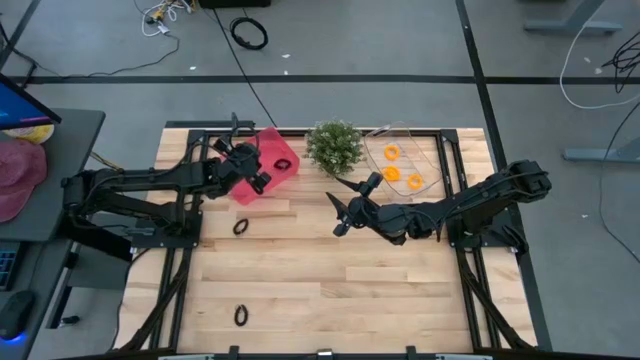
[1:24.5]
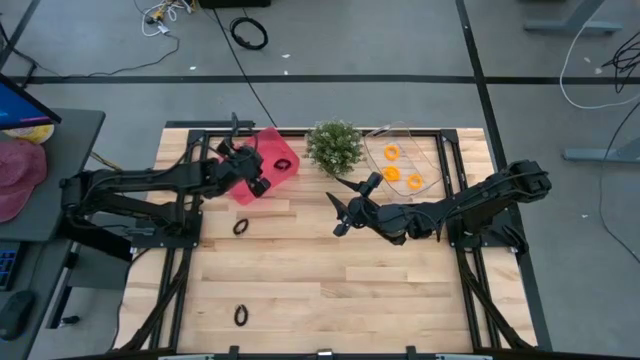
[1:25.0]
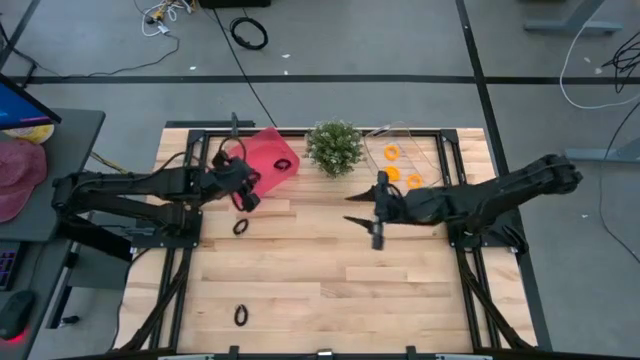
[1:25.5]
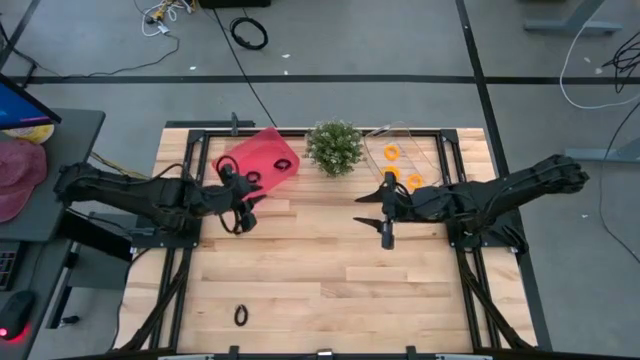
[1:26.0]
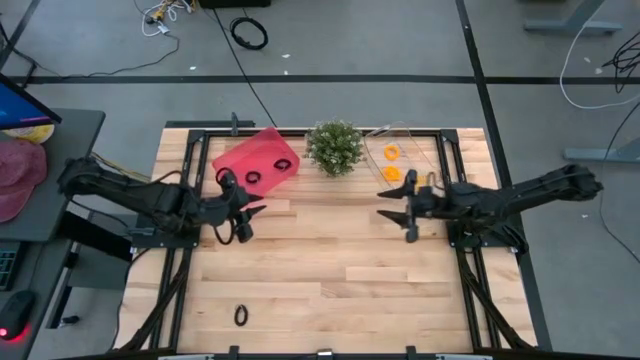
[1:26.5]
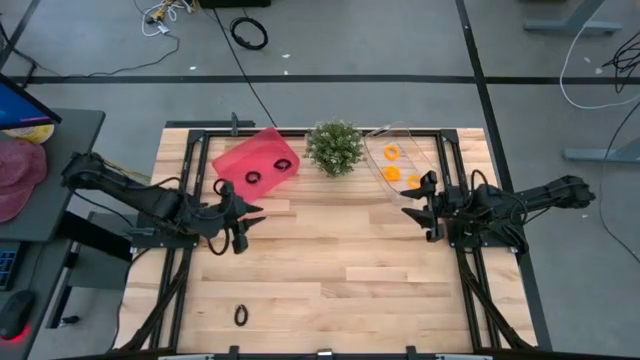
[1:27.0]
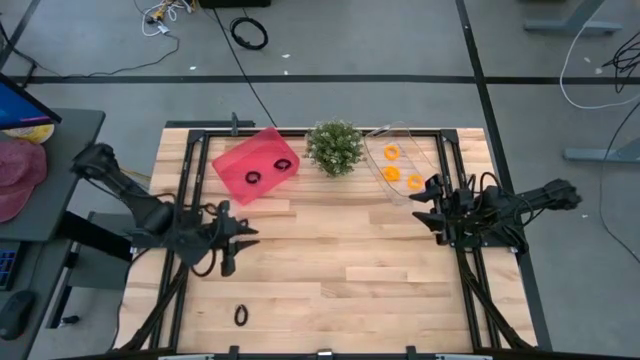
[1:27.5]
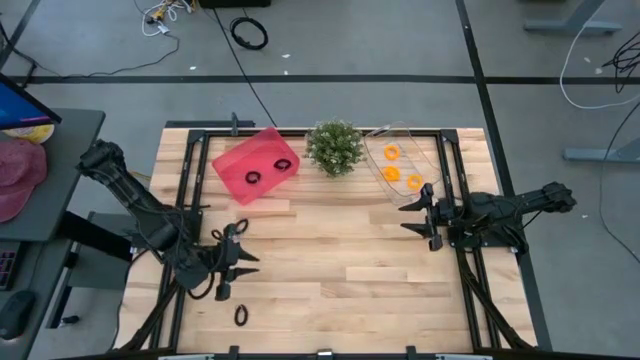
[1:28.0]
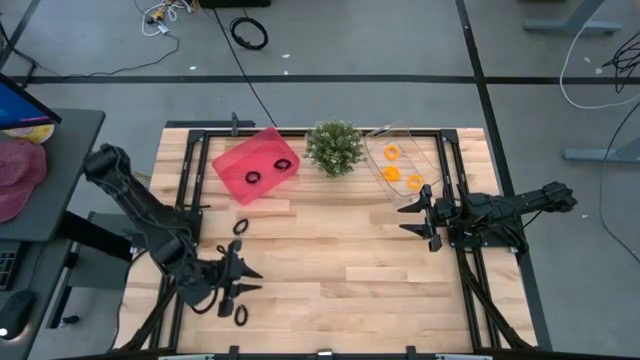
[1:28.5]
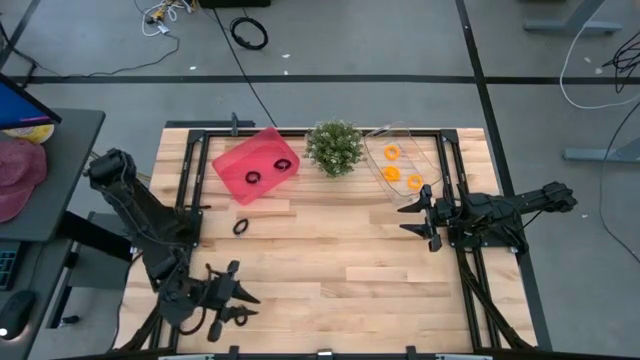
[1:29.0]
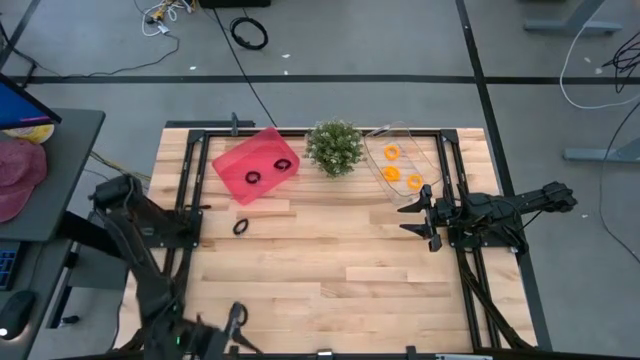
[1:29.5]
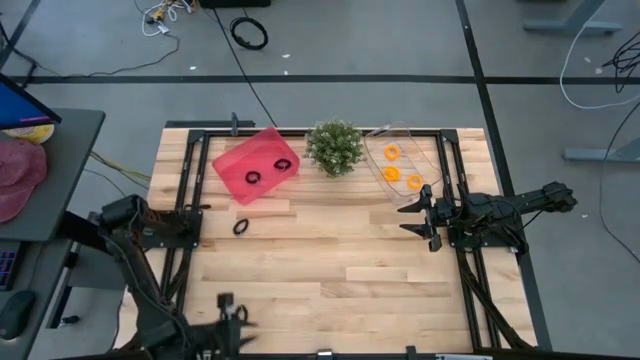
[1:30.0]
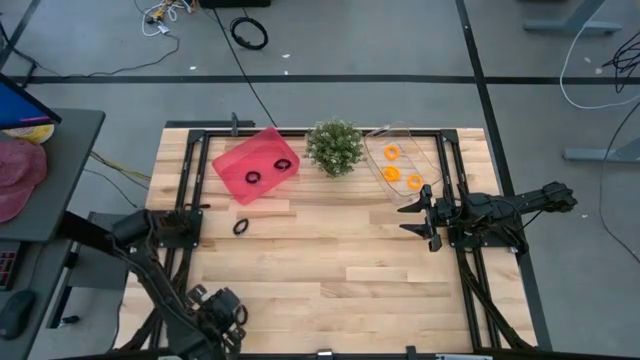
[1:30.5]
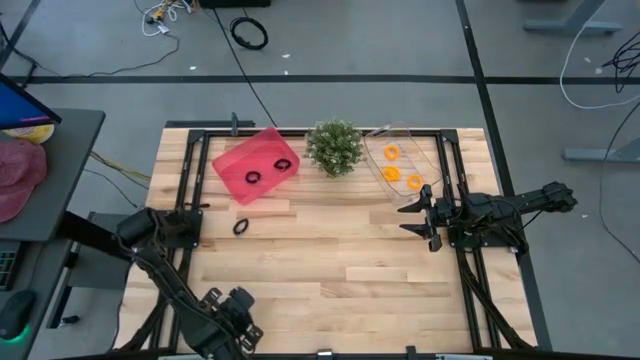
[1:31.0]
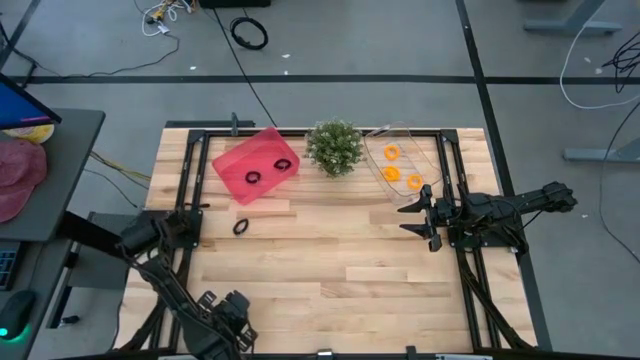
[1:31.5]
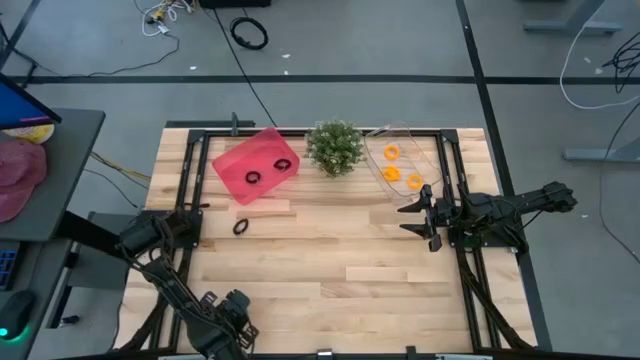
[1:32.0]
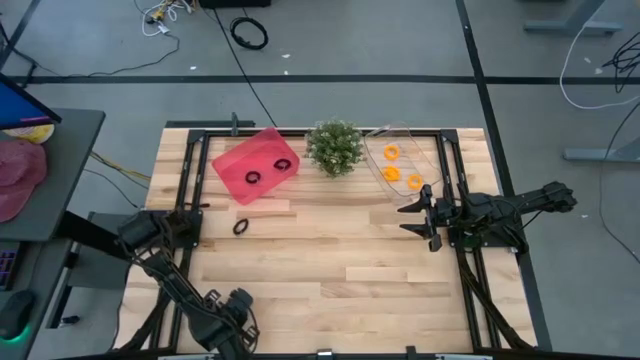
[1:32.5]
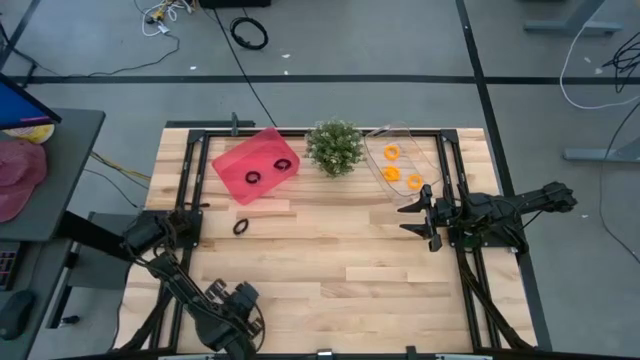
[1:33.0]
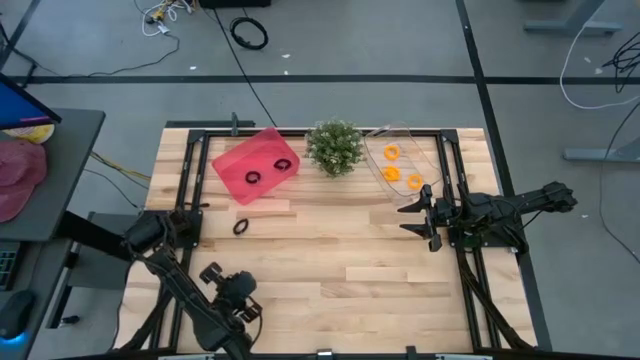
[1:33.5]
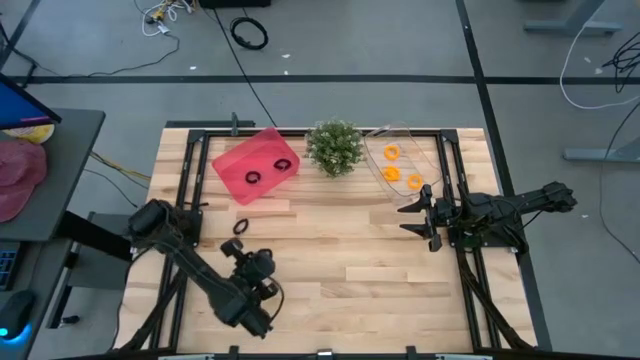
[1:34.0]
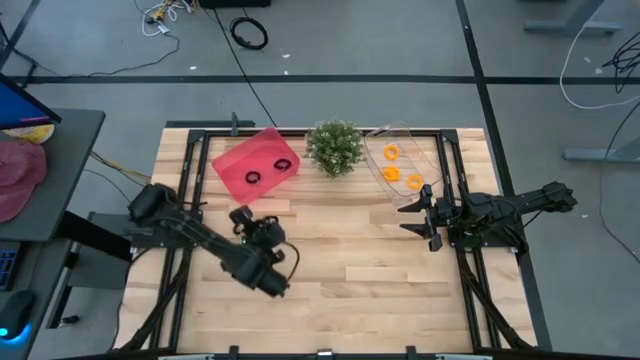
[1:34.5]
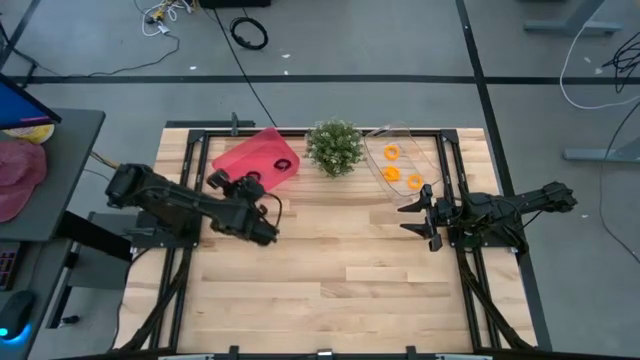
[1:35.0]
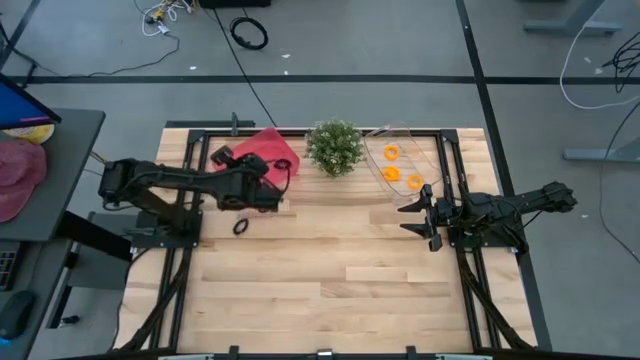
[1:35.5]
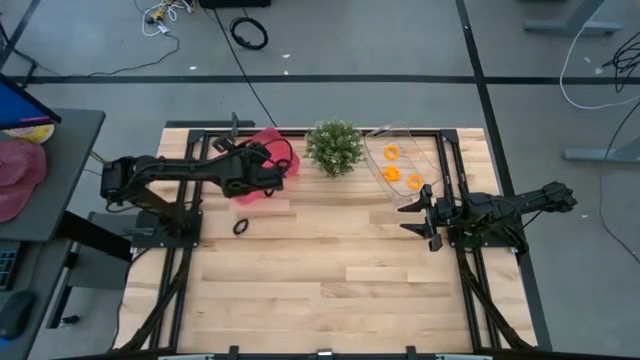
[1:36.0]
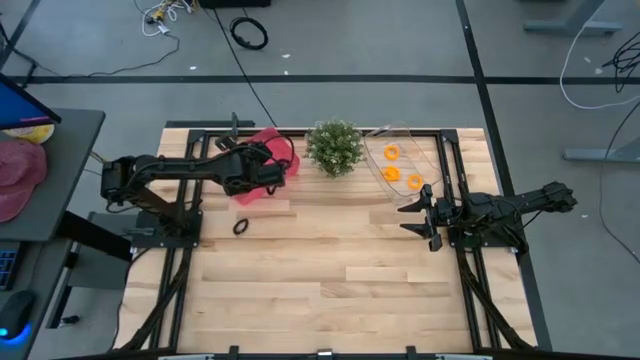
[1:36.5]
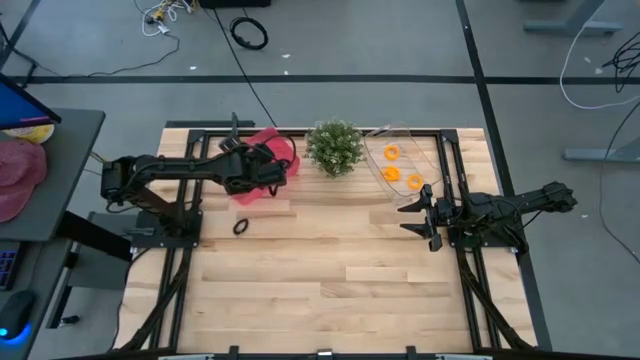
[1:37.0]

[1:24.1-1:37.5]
Task: Sort spring keychains
Put the black spring keychain into the pink bin

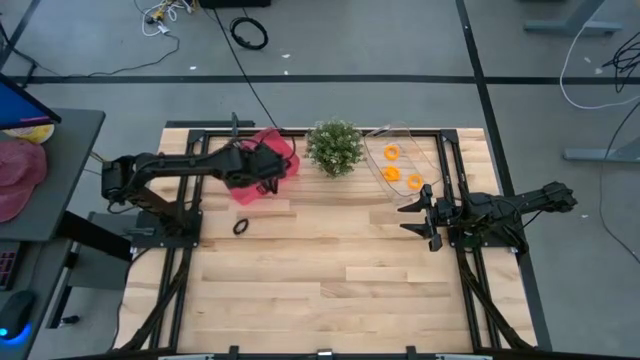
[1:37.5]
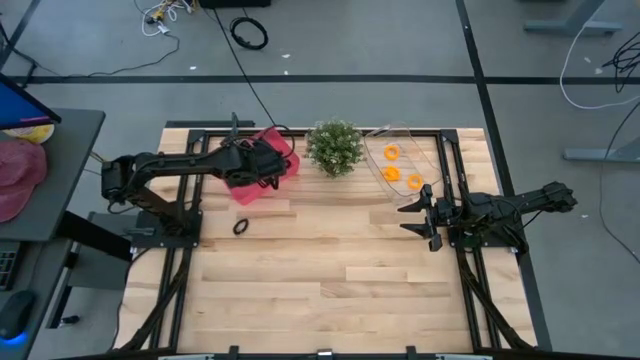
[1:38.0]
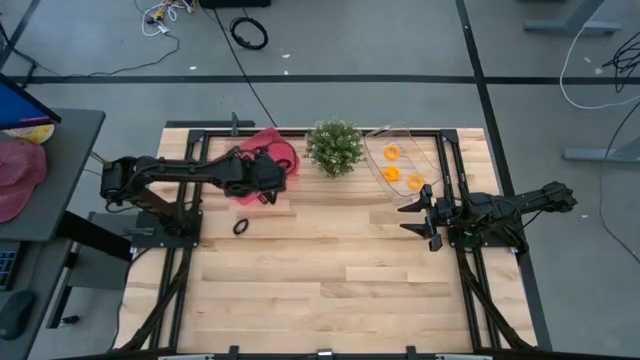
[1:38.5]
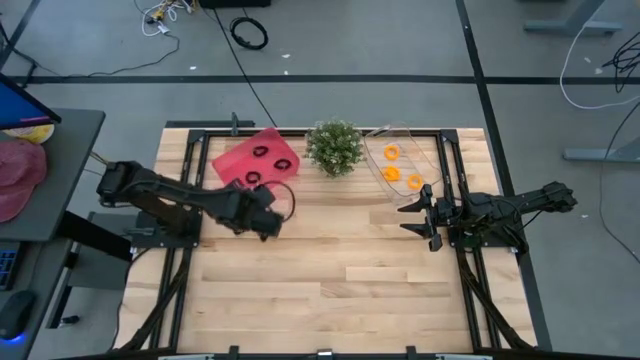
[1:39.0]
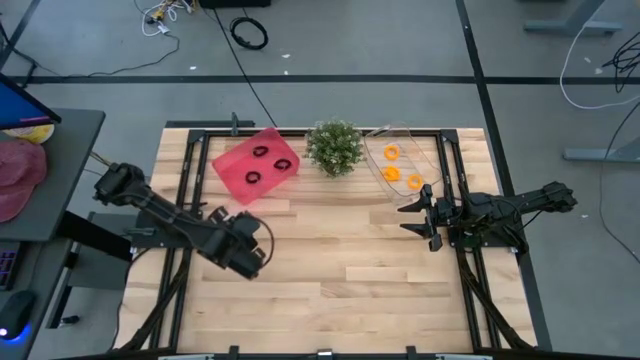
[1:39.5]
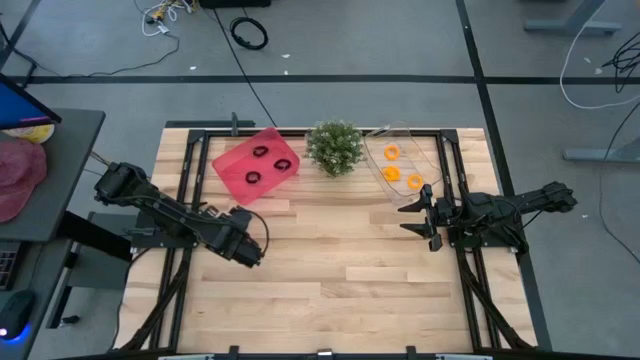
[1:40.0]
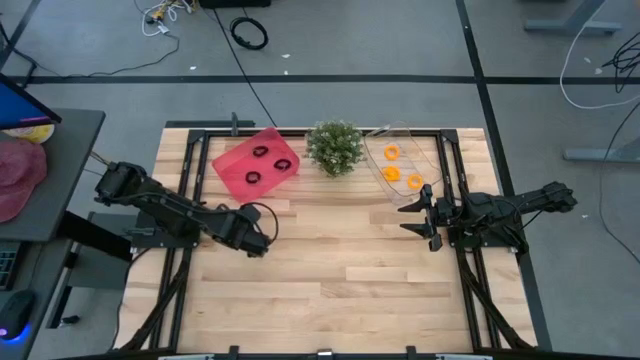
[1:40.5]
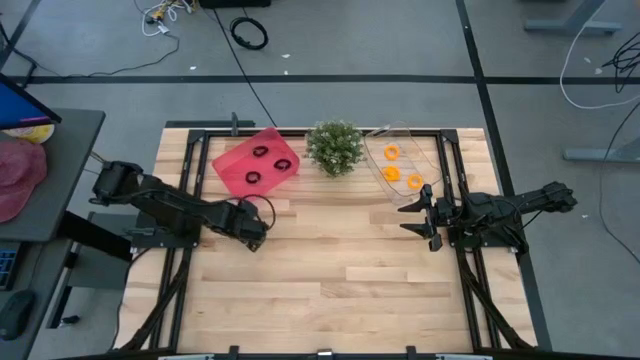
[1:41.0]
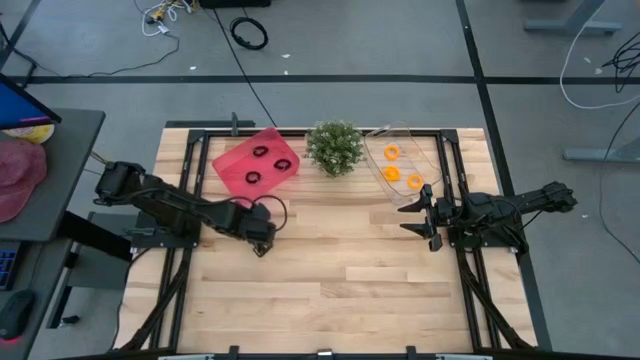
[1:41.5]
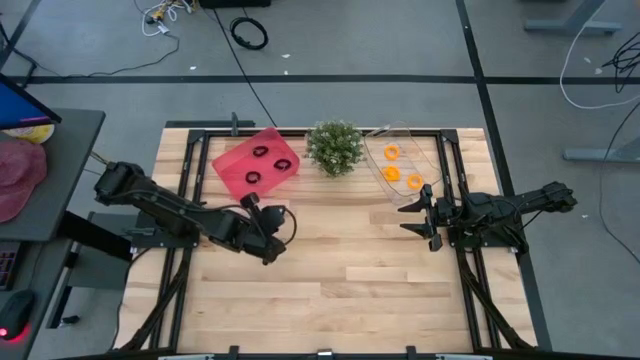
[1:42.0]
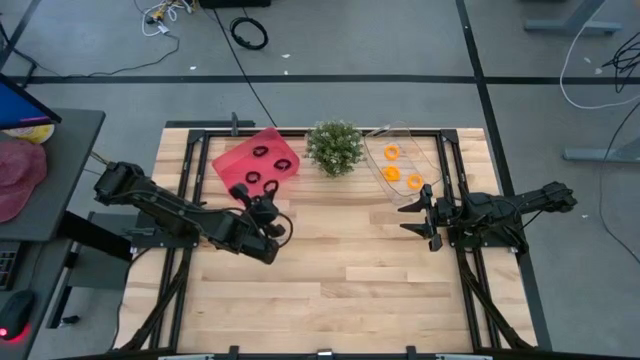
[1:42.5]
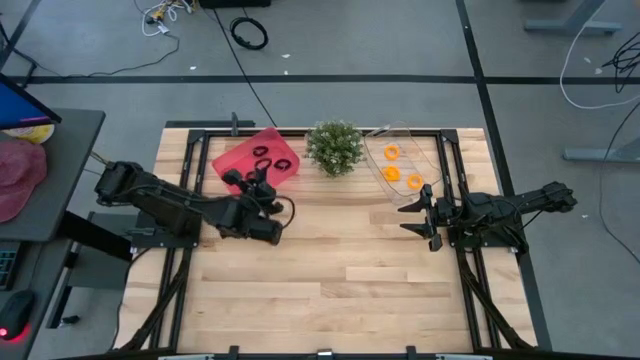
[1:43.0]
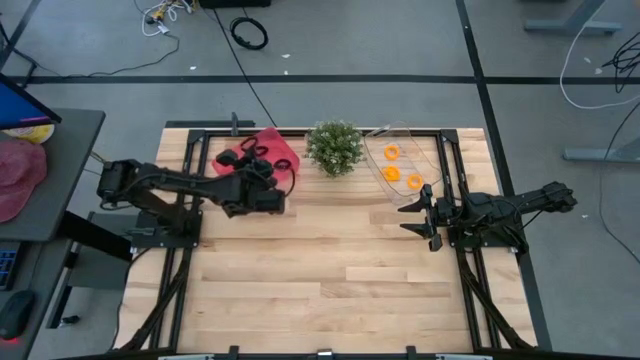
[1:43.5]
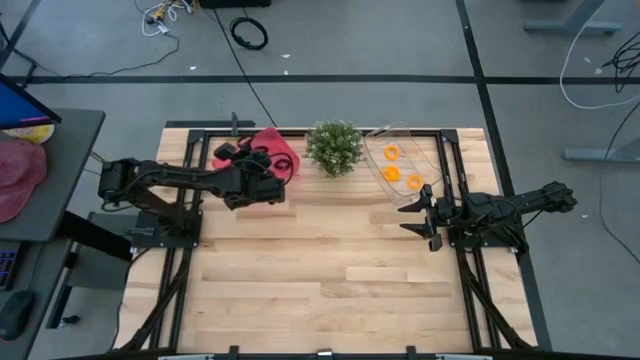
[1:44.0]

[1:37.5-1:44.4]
Put the black spring keychain into the pink bin

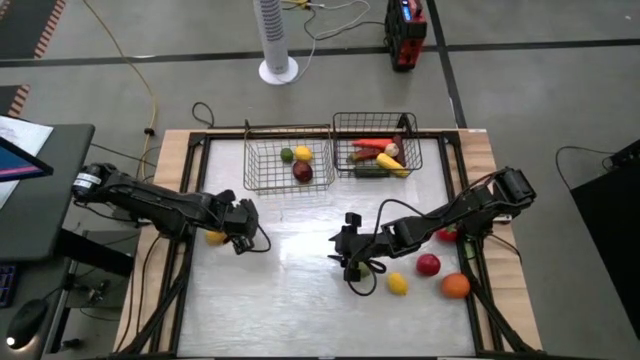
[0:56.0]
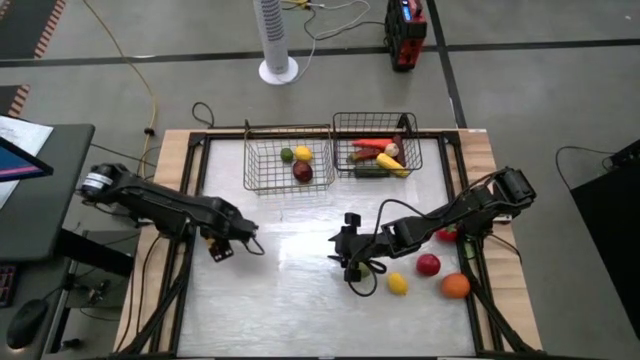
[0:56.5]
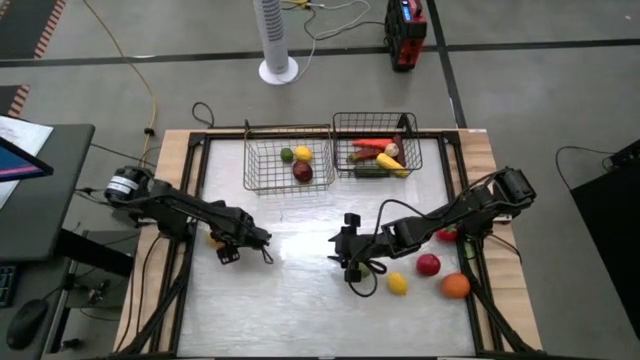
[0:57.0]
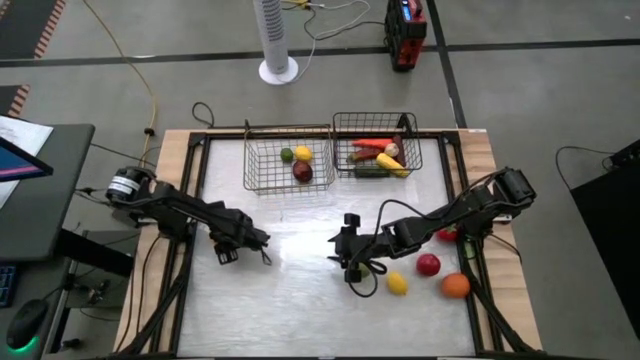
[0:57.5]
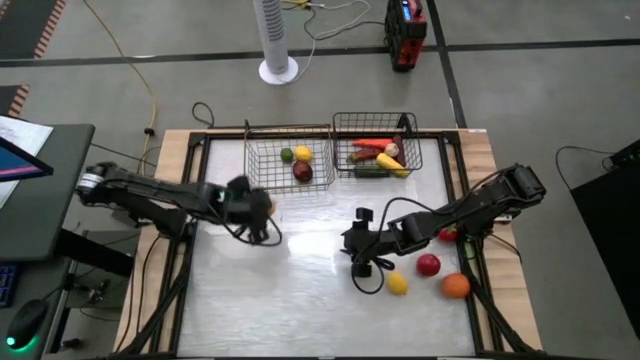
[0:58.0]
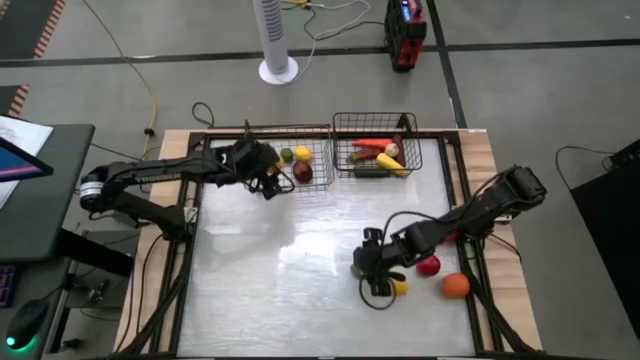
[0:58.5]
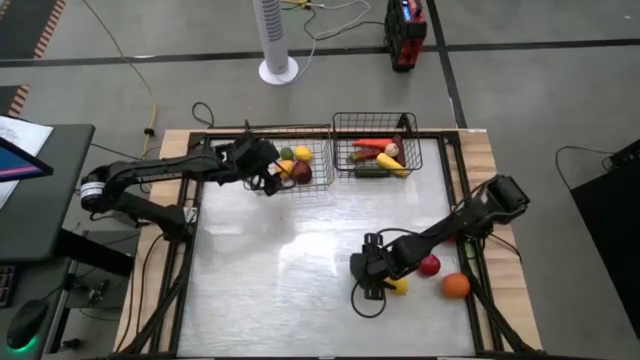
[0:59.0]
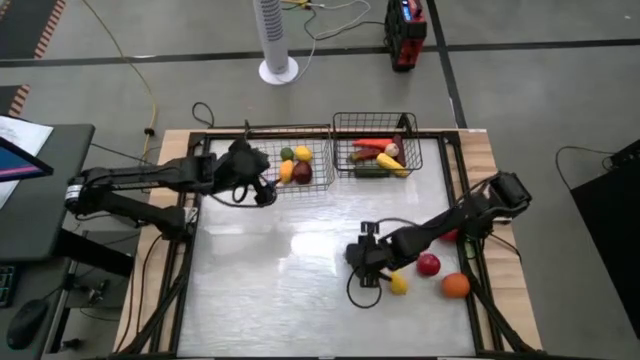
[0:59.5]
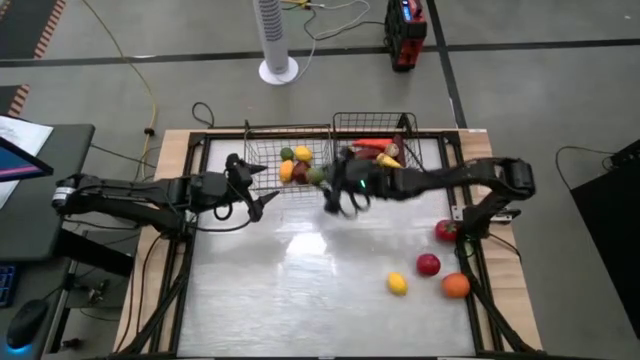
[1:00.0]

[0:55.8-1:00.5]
Task: Sort produce into baskets
Put the lime into the left wire basket
